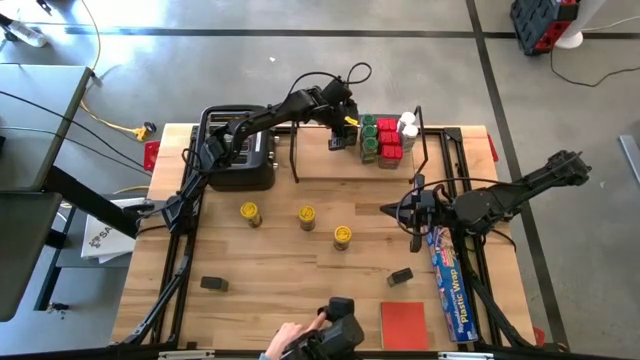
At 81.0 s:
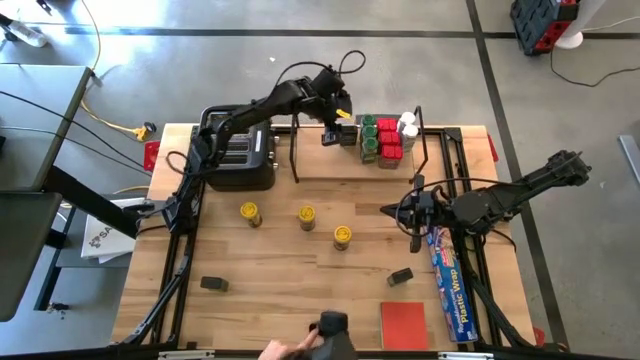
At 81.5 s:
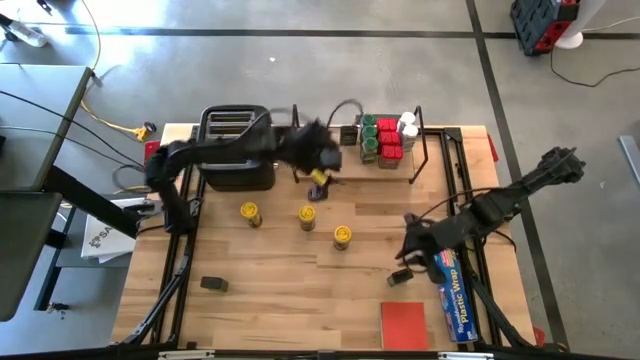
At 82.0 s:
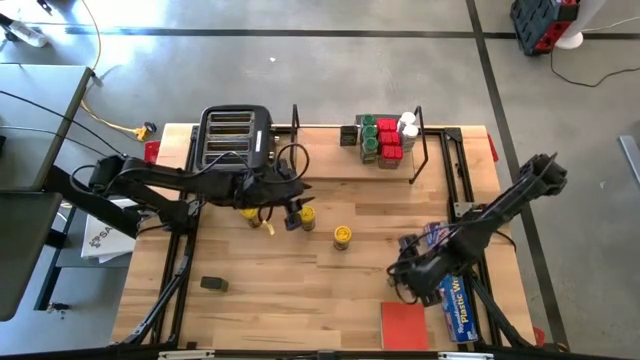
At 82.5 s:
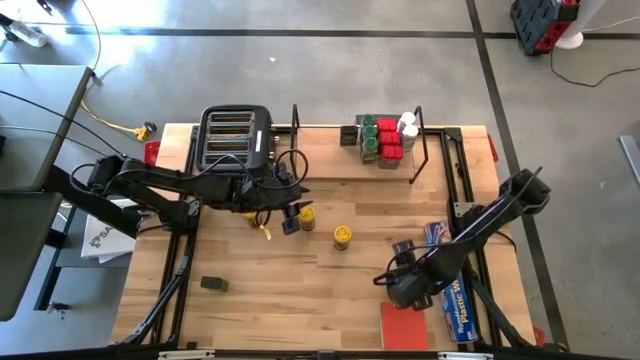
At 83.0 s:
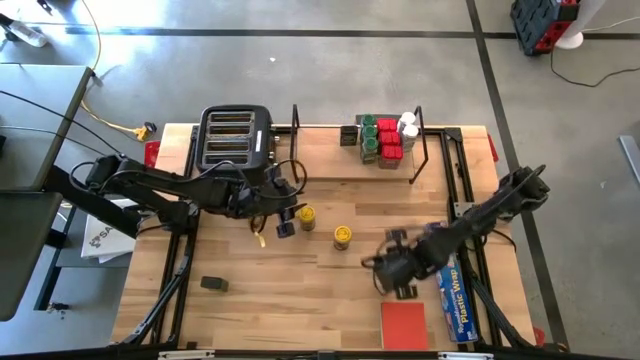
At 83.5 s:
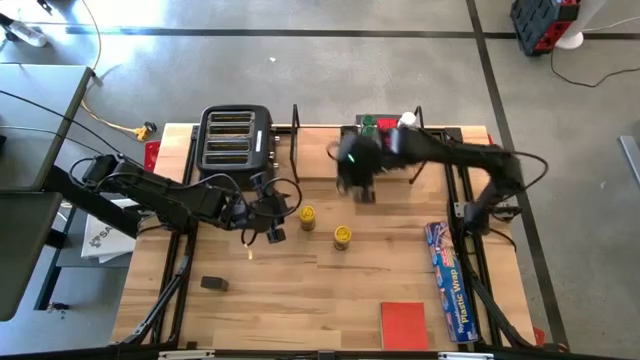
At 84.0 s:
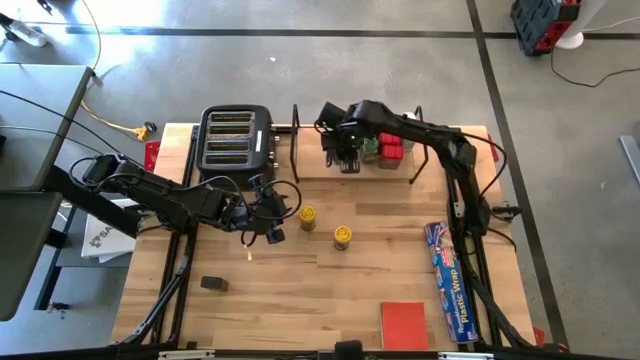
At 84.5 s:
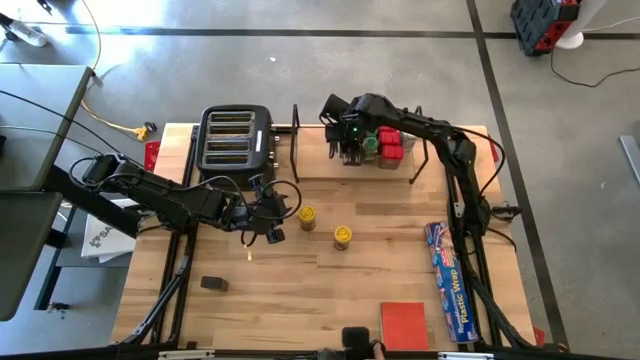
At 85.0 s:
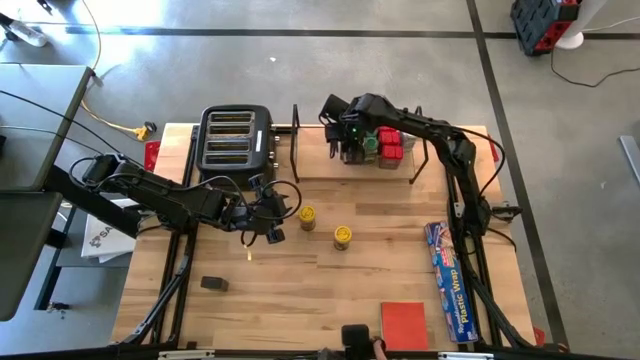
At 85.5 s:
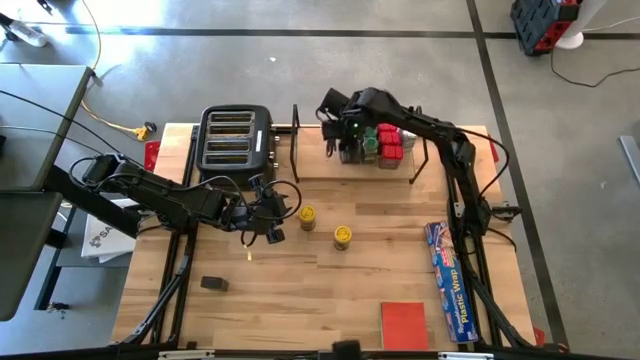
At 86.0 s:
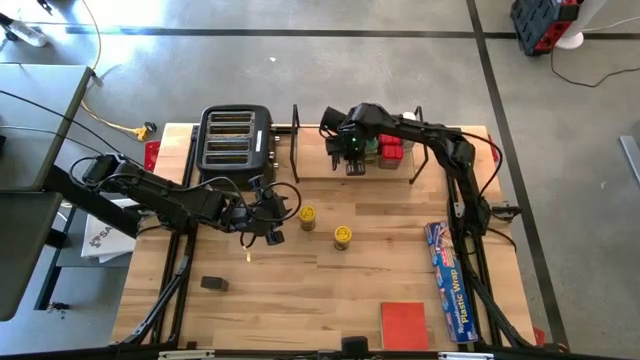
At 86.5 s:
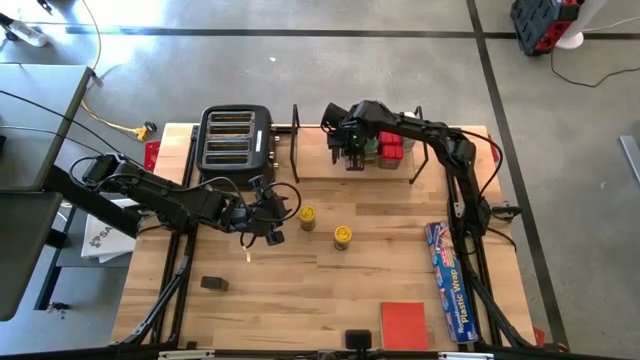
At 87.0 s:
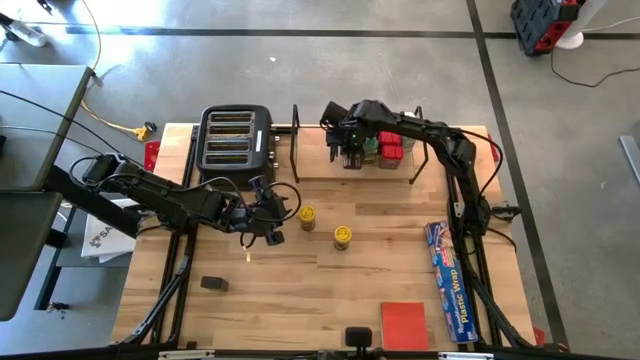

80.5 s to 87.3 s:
Task: Shelf spices
Put the right black seasoning can on the shelf aligned with the other seasoning can

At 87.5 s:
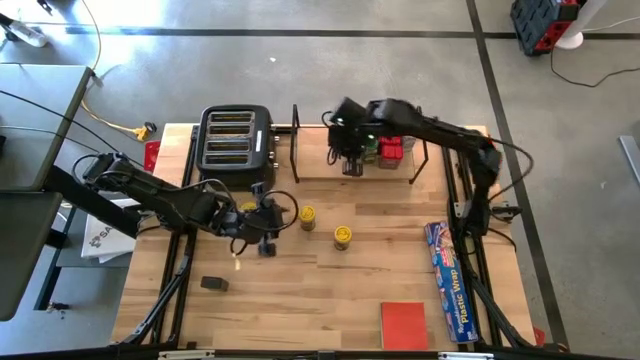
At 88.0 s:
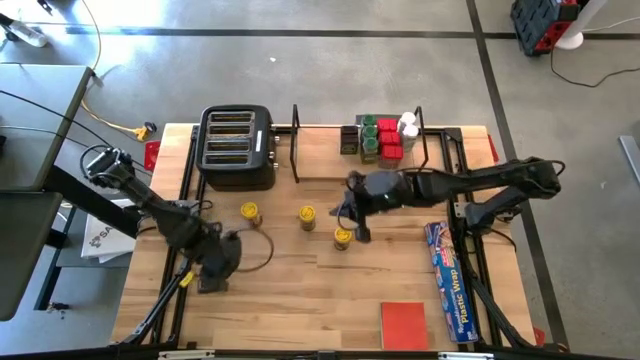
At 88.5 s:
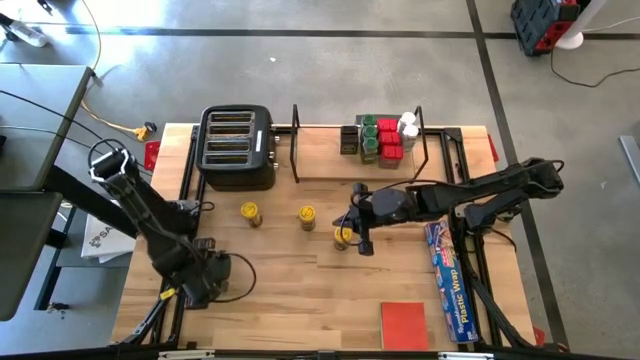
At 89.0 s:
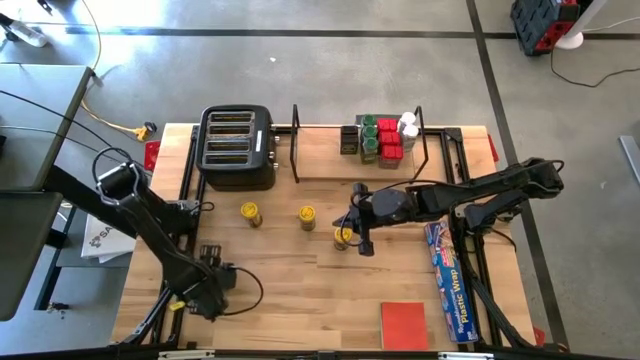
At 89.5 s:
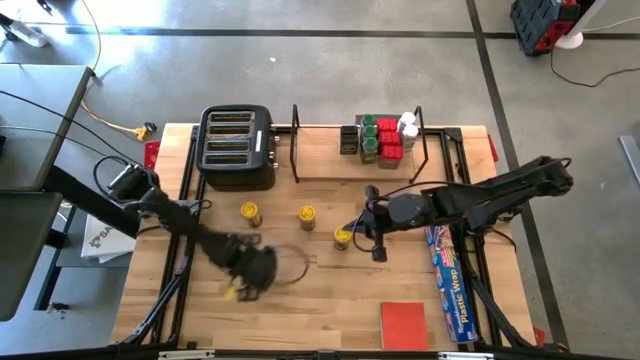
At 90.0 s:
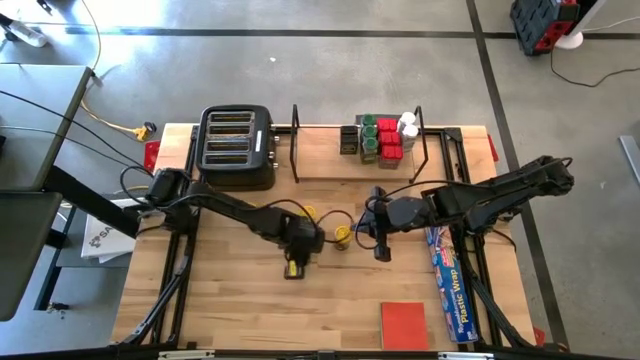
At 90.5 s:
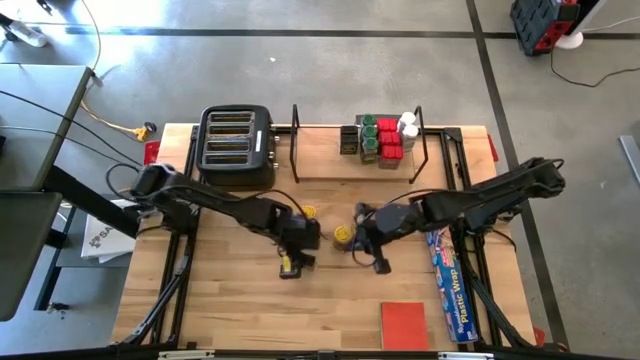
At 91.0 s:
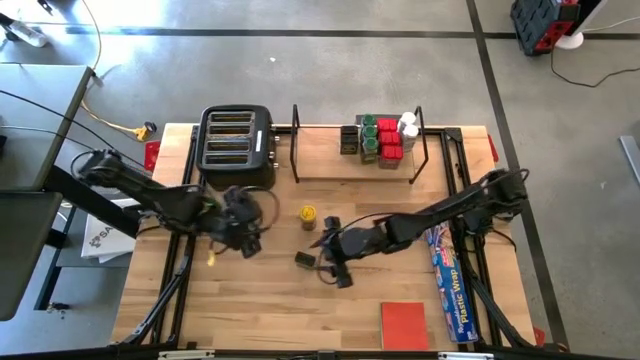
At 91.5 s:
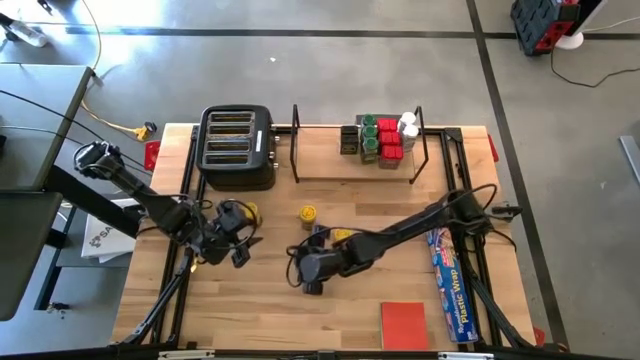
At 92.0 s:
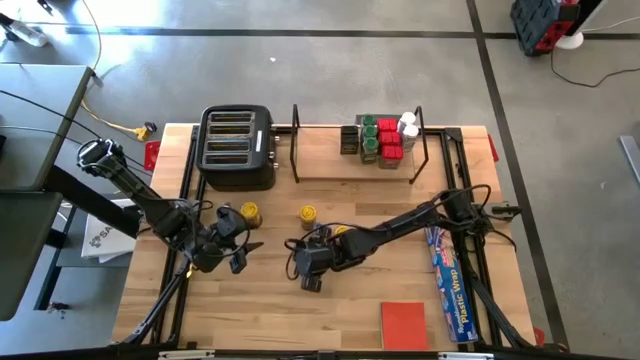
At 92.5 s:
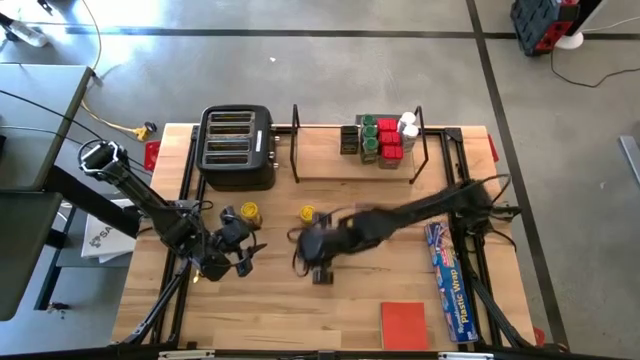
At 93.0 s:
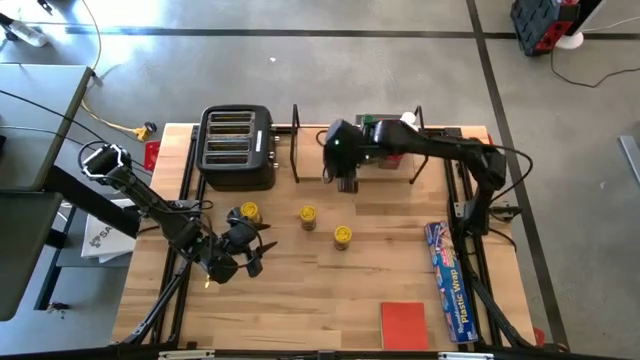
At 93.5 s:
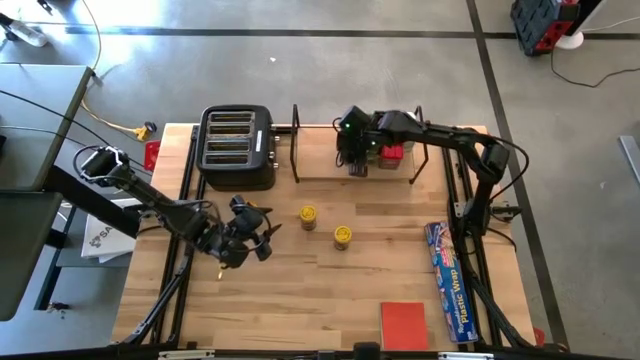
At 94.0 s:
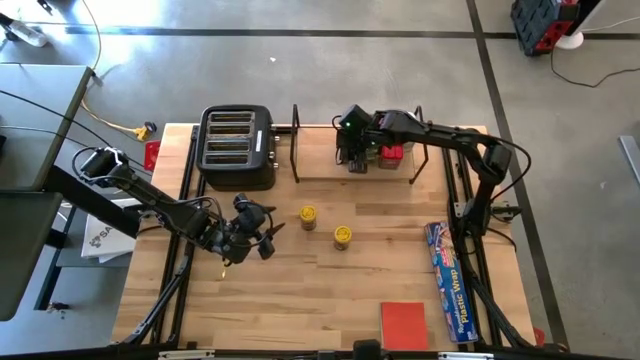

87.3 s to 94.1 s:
Put the black seasoning can on the shelf aligned with the other seasoning cans

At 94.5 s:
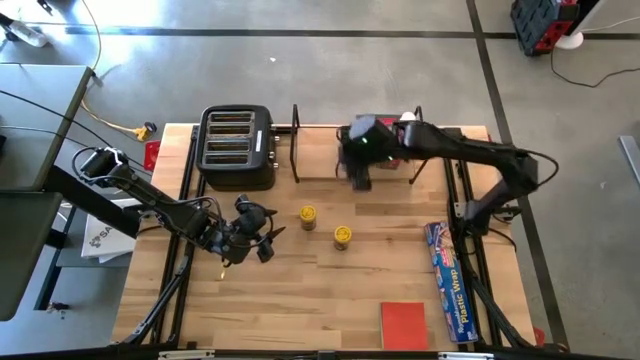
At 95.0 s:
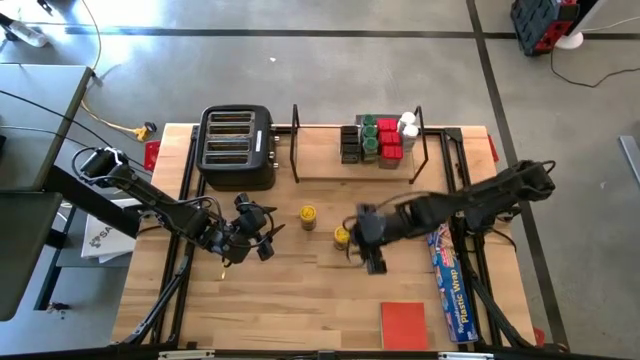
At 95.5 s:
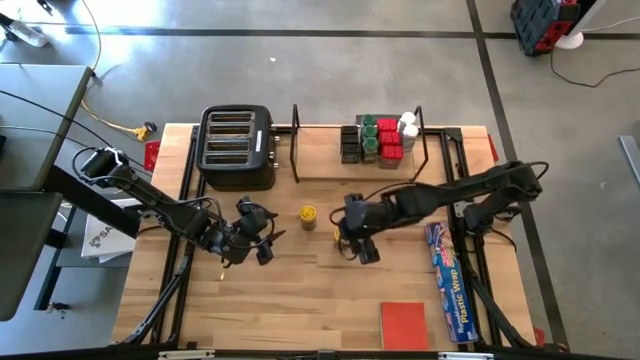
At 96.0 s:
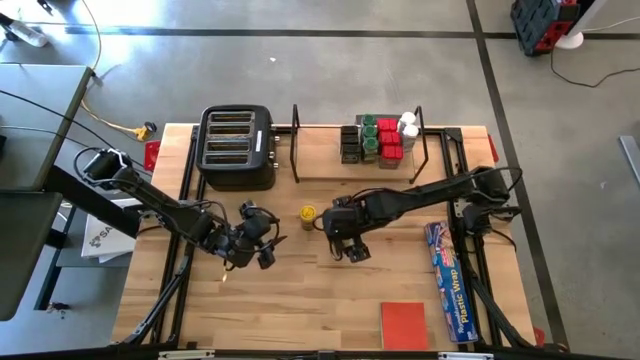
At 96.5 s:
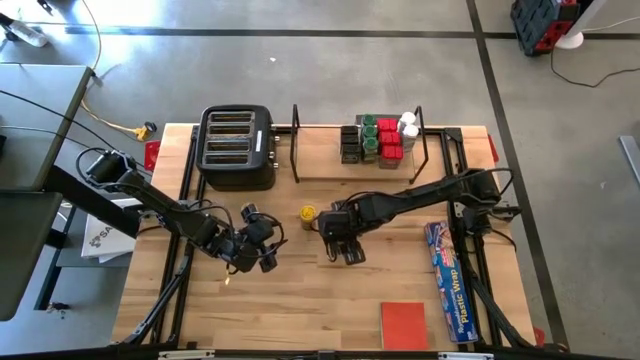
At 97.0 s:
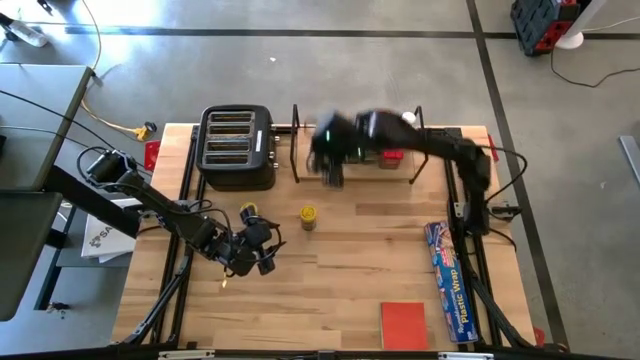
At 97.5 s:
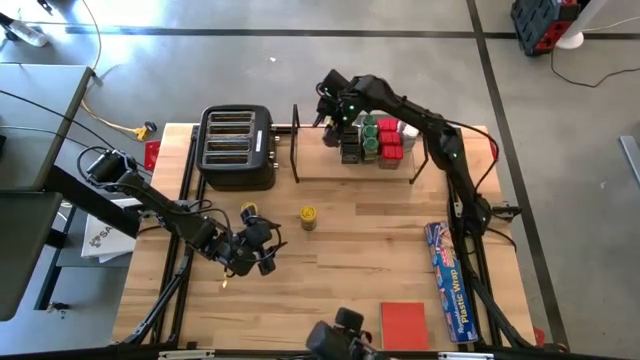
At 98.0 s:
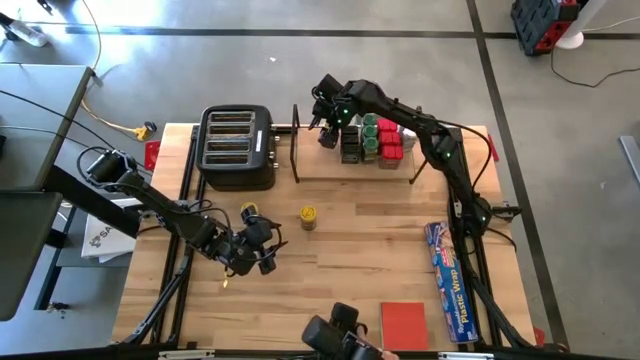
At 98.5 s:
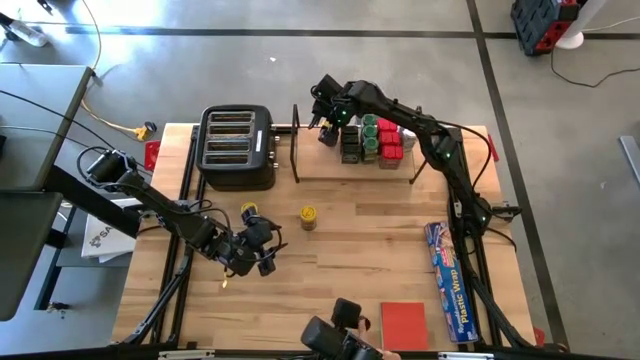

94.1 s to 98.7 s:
Put the bottom right yellow seasoning bottle on the shelf

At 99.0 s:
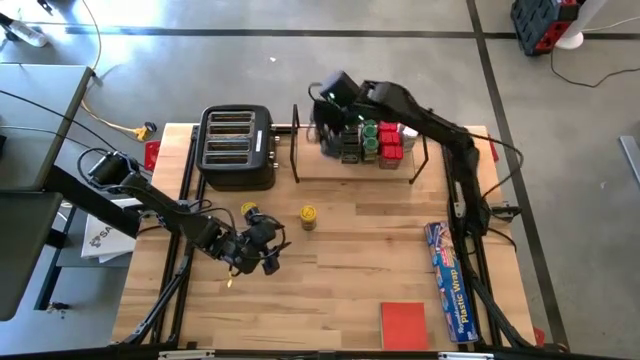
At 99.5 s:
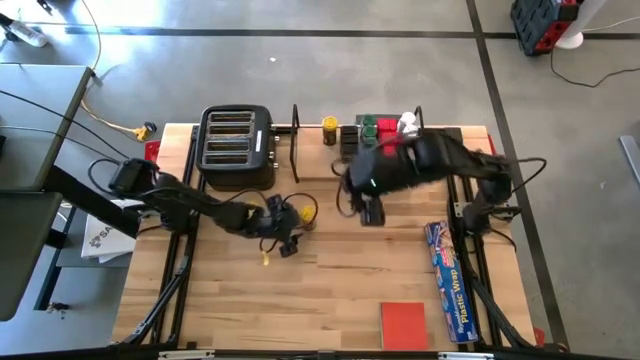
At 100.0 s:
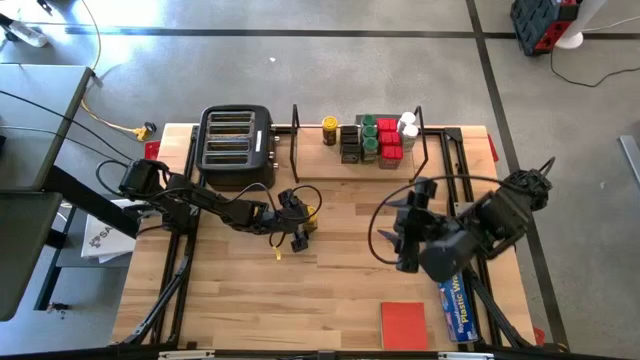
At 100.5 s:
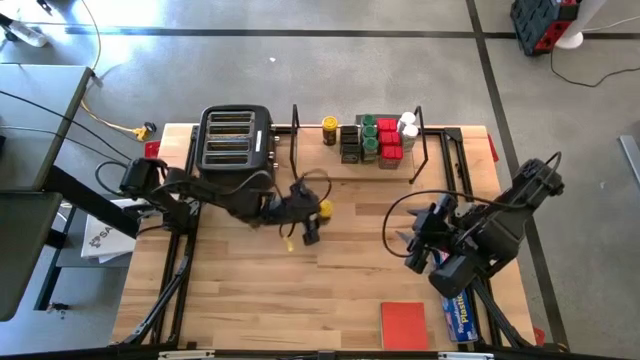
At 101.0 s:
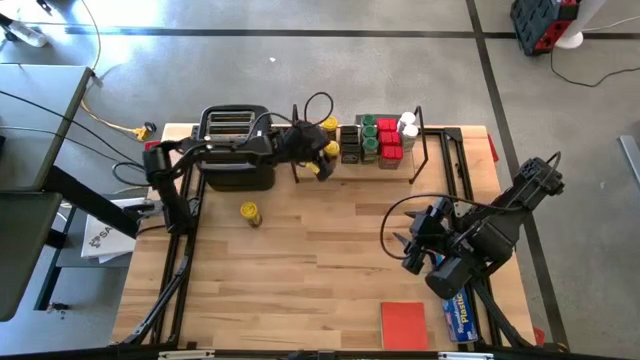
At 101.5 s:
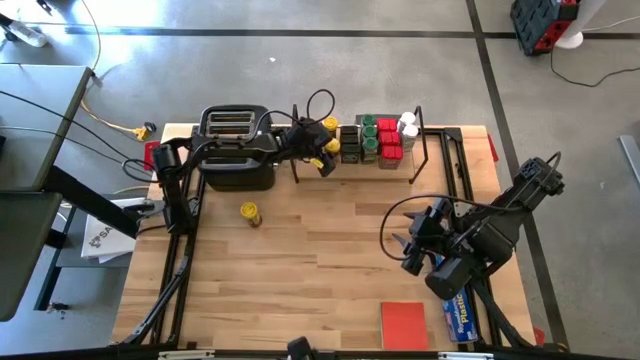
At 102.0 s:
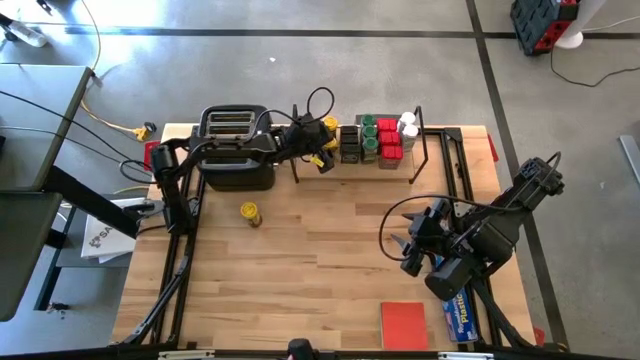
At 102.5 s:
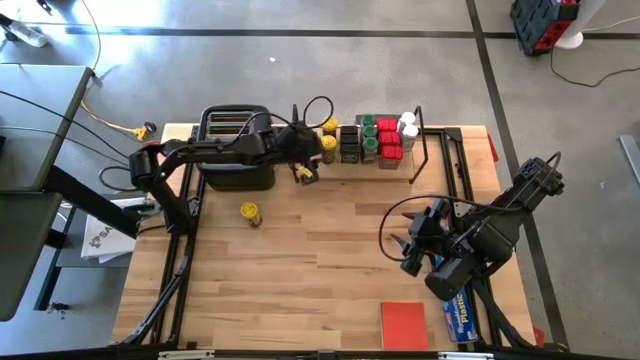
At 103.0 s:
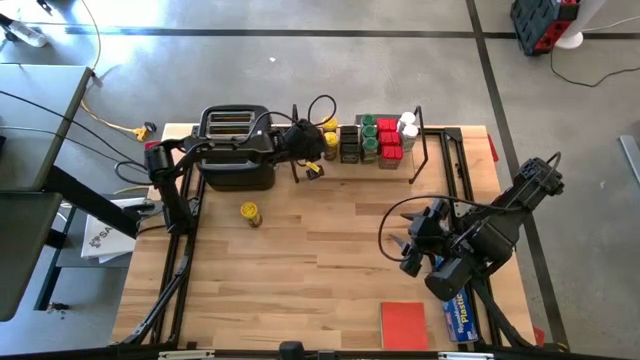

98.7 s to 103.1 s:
Put the right yellow seasoning bottle on the shelf aligned with the other seasoning bottle
